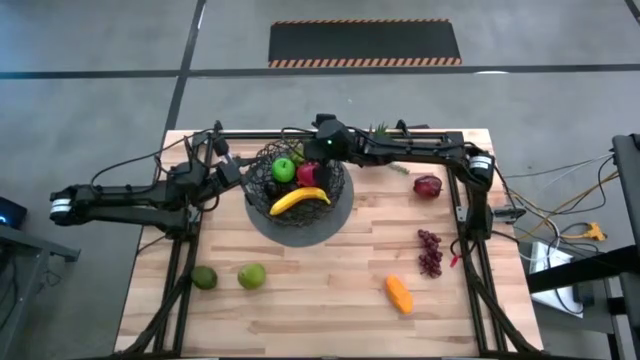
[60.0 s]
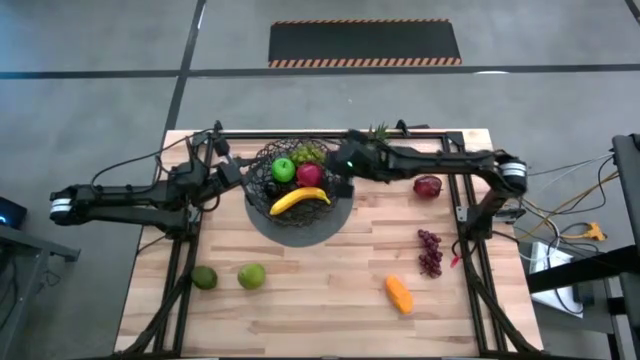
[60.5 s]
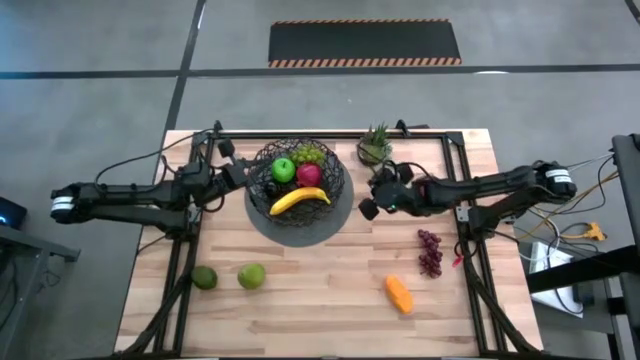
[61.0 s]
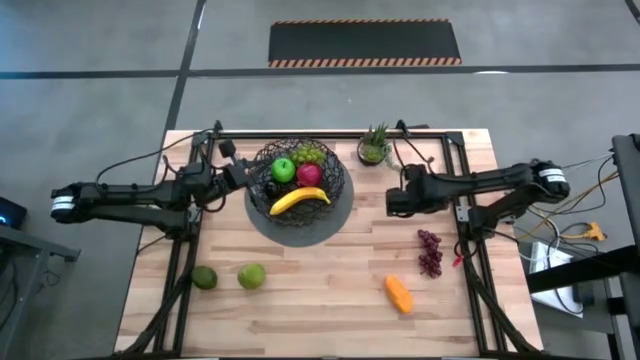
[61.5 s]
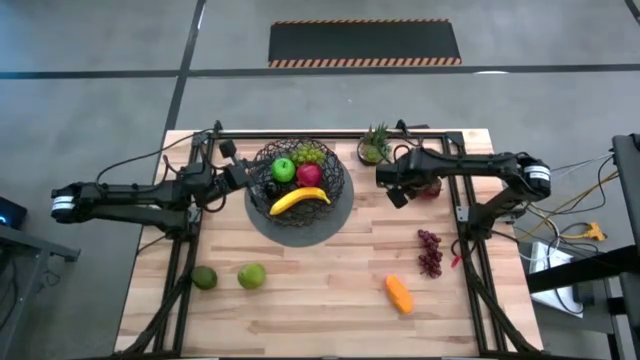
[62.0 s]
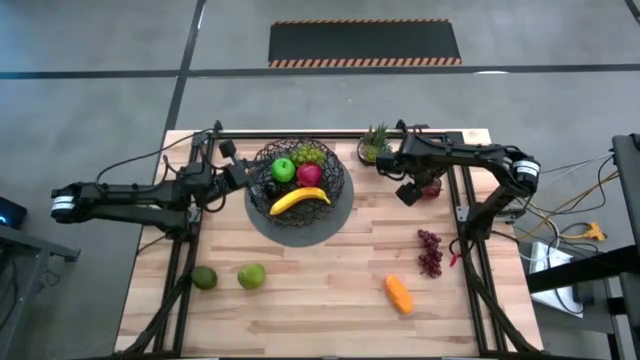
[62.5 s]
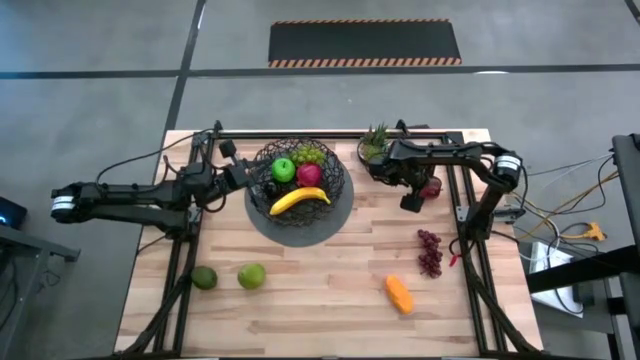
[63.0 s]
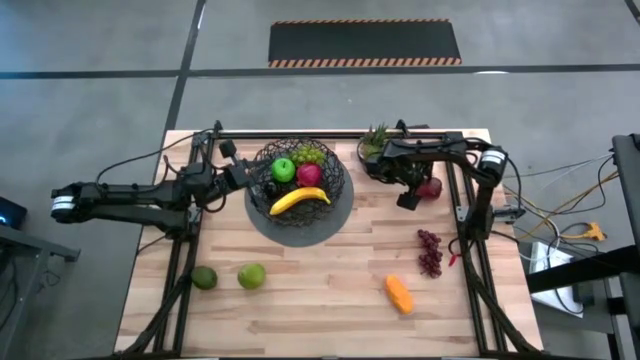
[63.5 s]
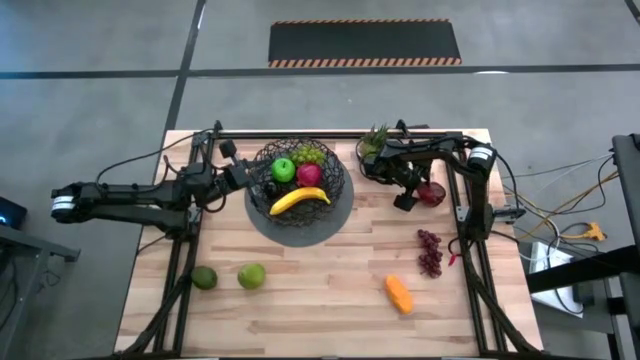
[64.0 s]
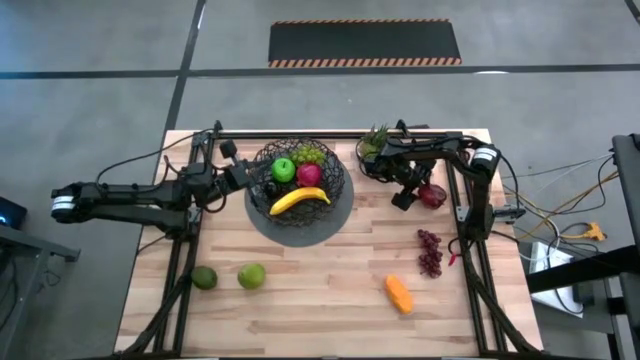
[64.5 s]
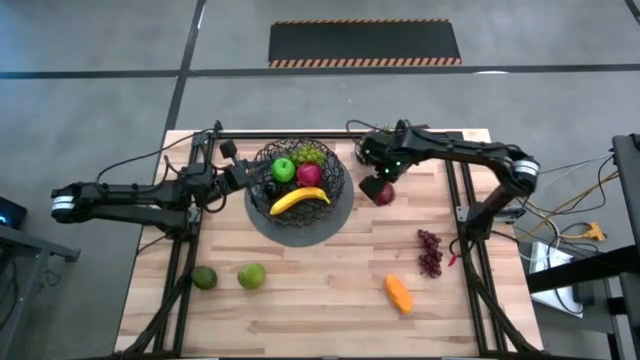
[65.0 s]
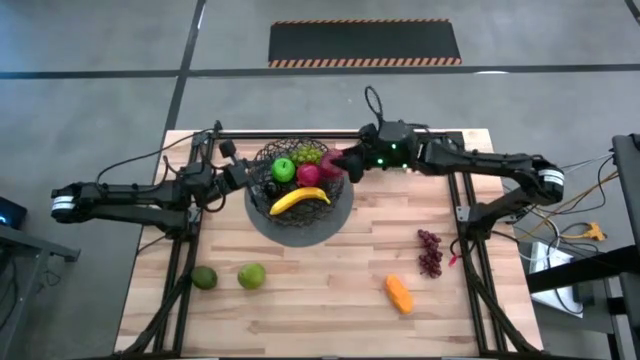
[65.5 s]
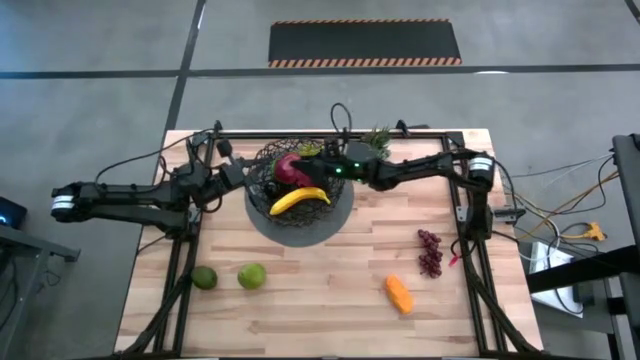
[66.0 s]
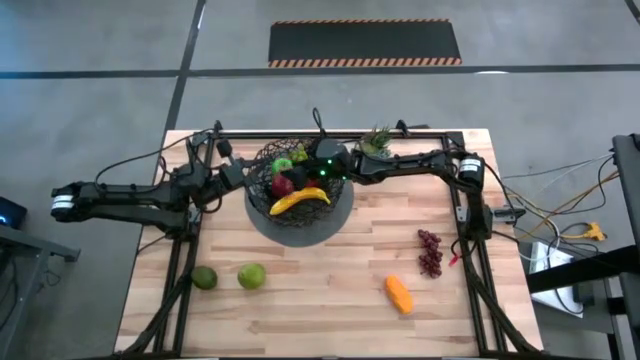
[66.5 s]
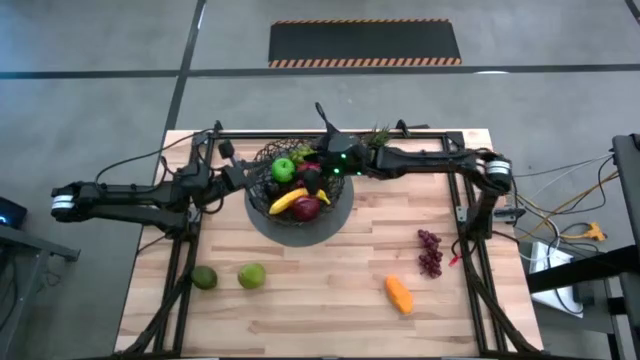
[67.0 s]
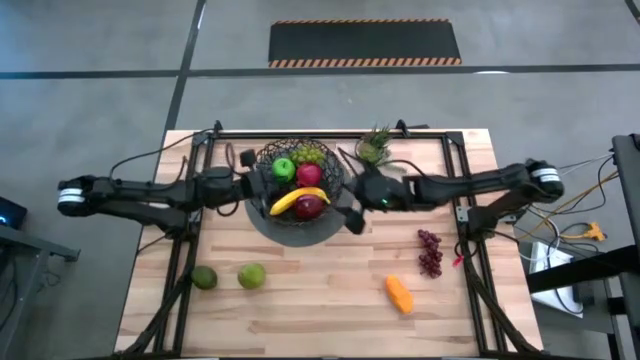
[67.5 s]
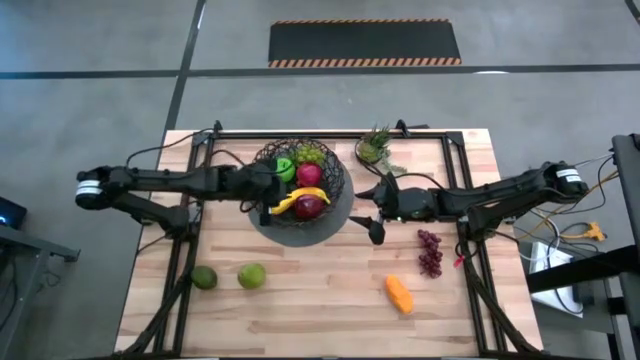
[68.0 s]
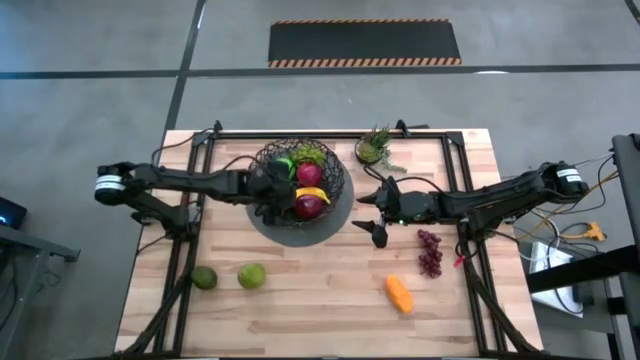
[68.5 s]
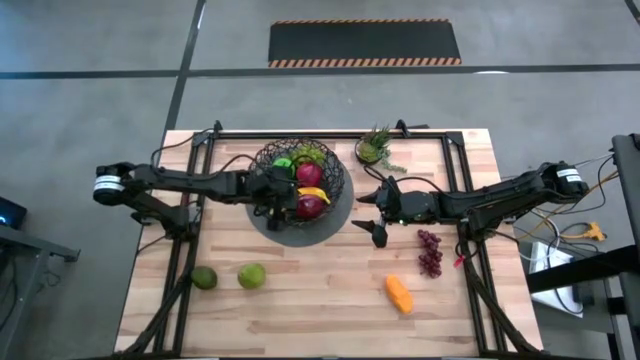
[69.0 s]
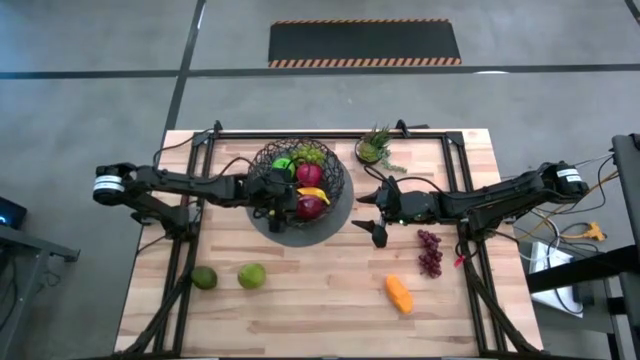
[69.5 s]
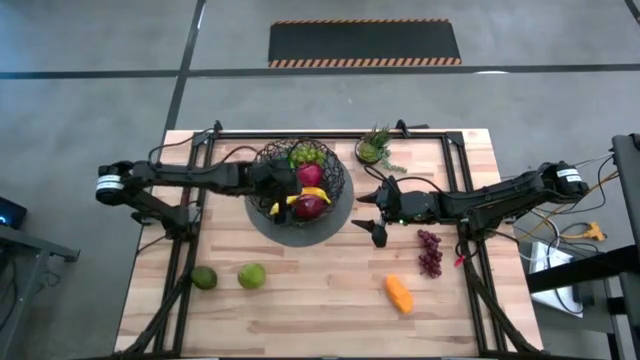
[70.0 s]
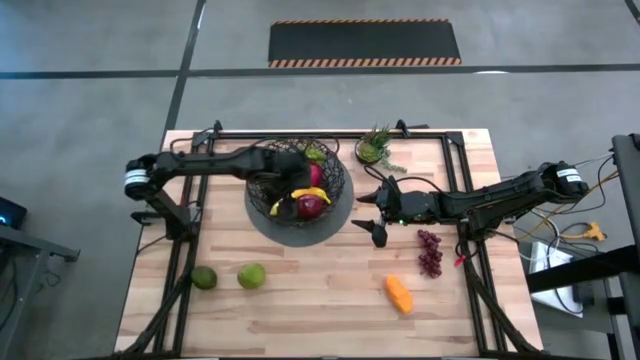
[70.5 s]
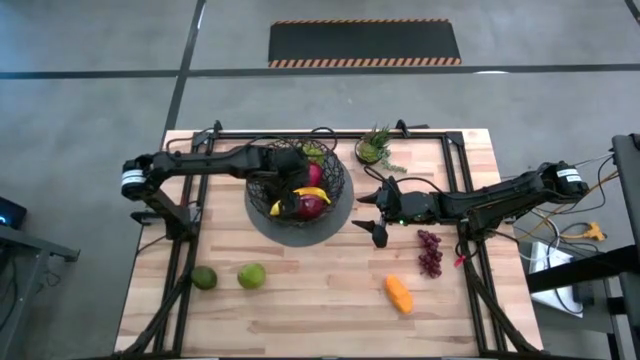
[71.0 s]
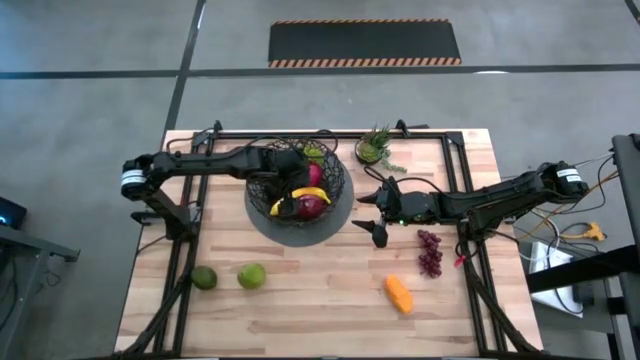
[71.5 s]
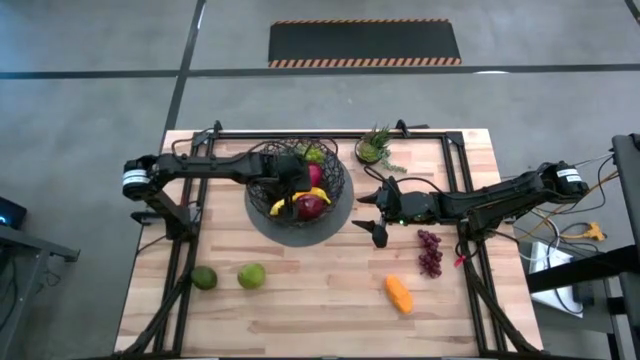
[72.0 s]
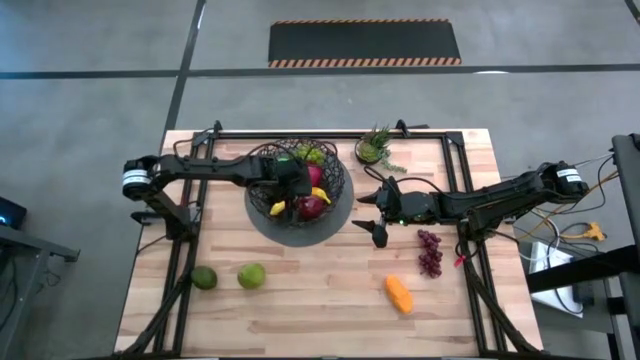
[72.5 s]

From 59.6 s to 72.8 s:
Task: Build produce basket
Put the red apple into the black wire basket

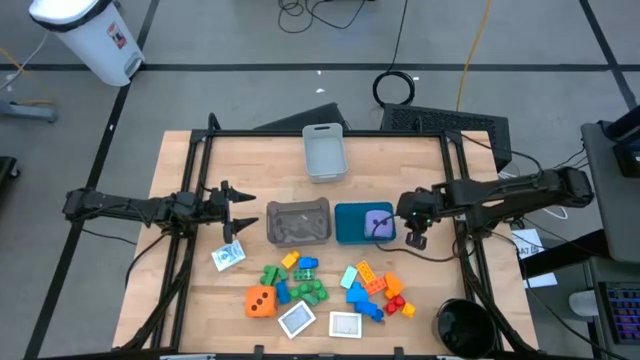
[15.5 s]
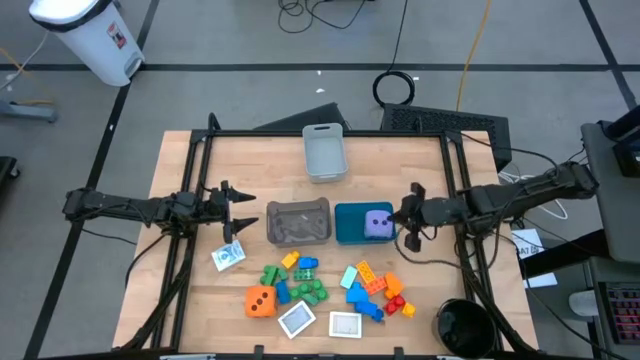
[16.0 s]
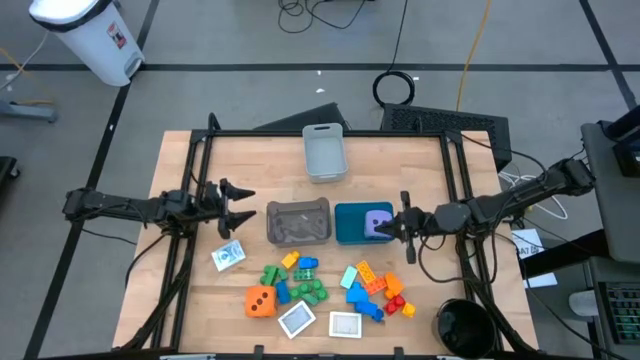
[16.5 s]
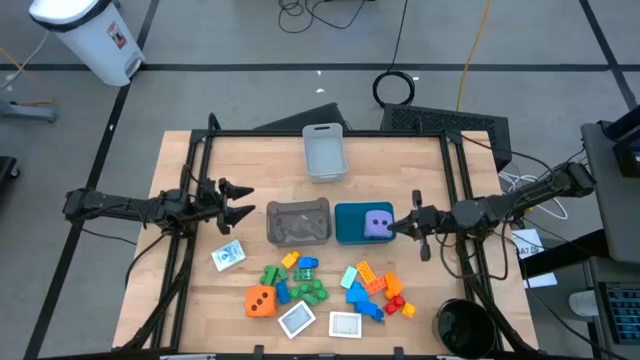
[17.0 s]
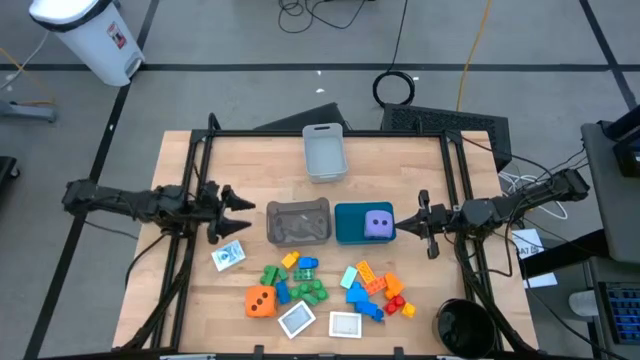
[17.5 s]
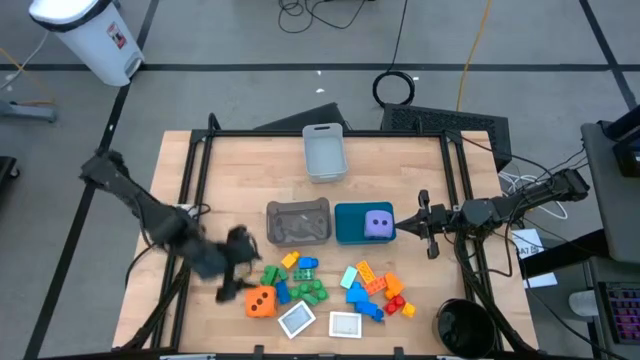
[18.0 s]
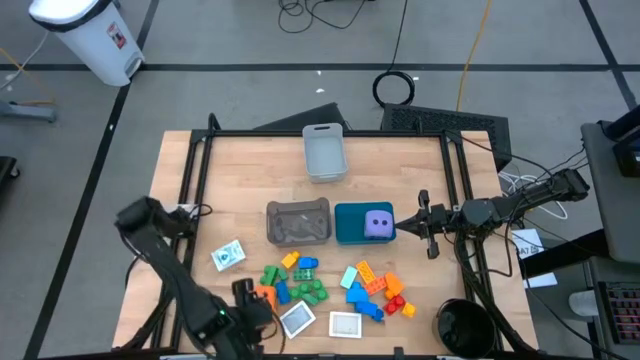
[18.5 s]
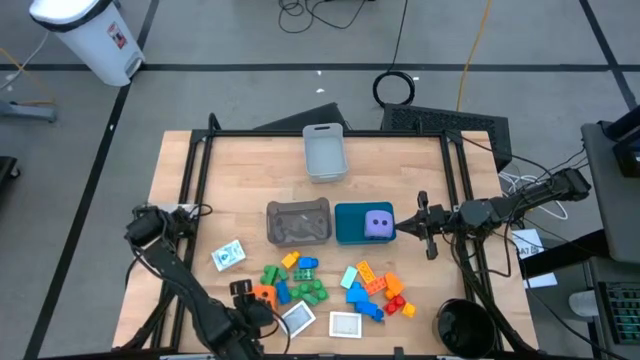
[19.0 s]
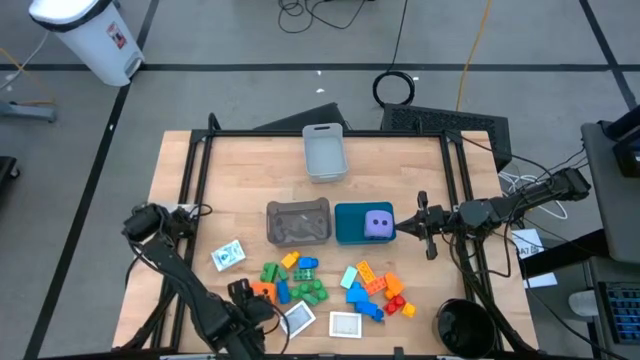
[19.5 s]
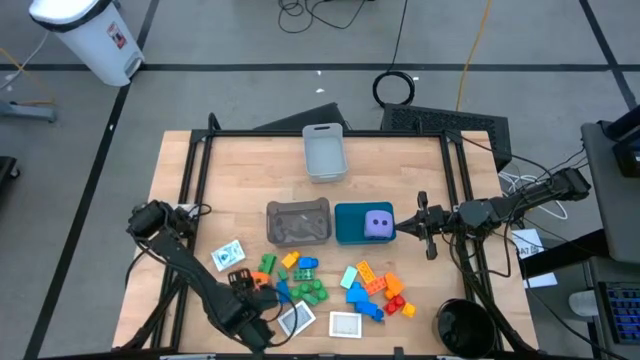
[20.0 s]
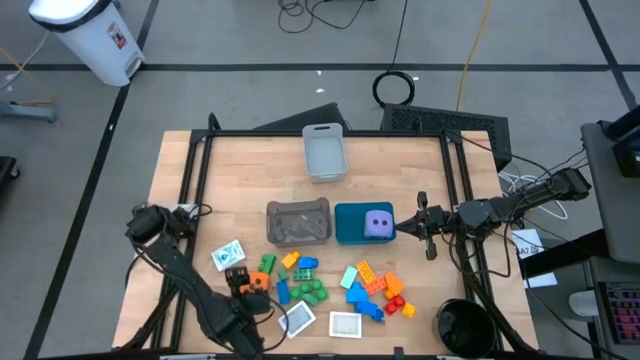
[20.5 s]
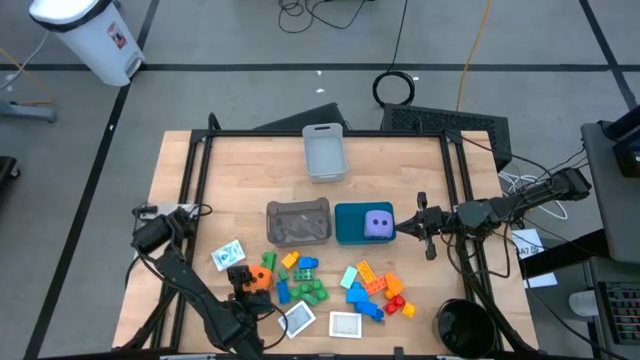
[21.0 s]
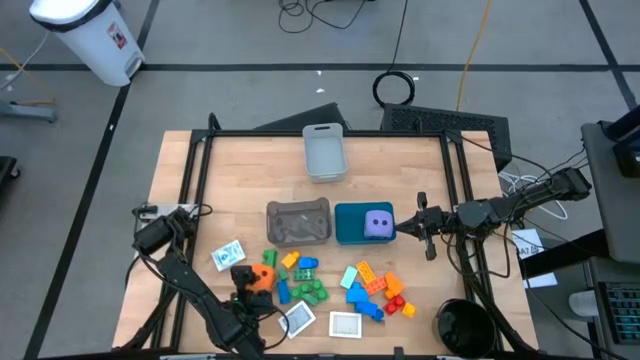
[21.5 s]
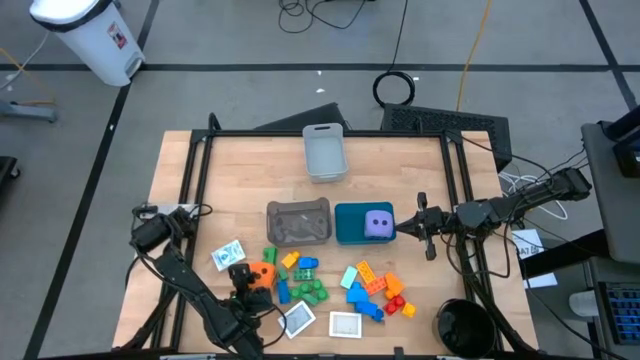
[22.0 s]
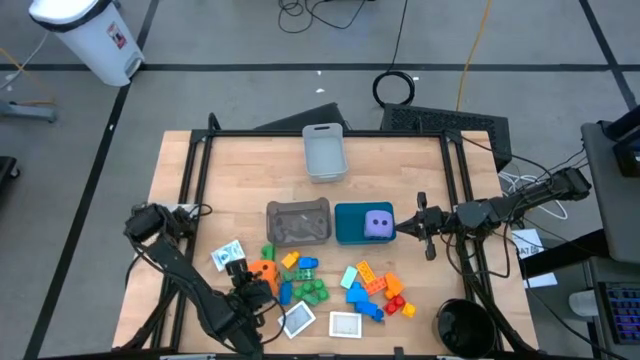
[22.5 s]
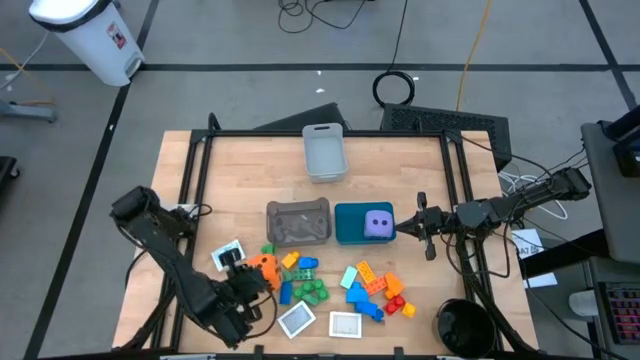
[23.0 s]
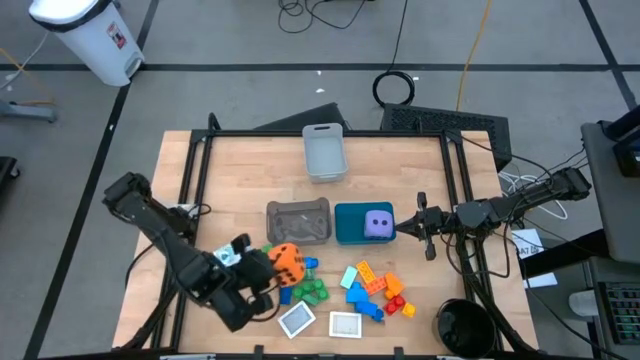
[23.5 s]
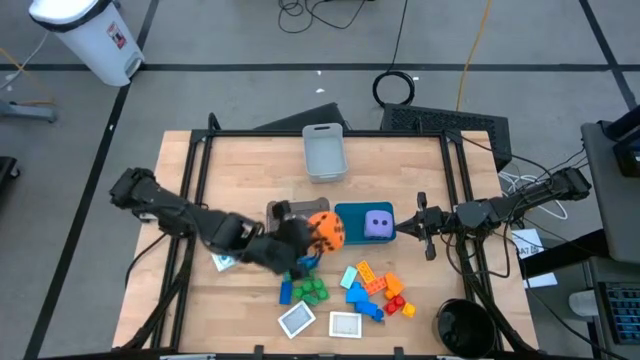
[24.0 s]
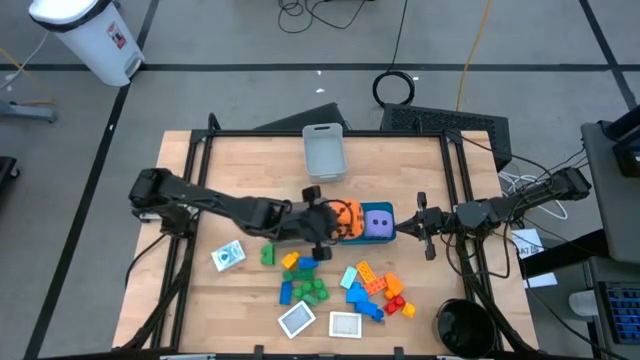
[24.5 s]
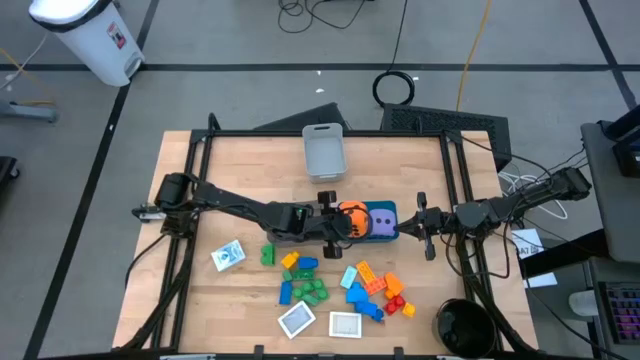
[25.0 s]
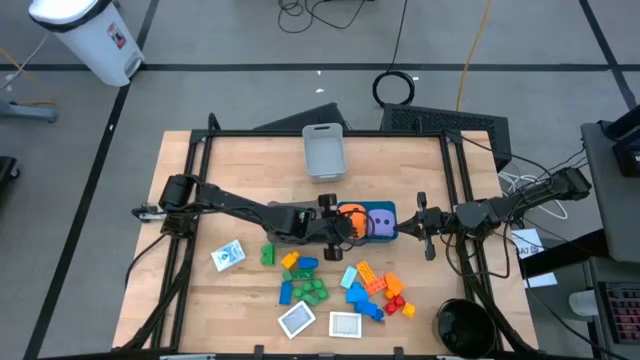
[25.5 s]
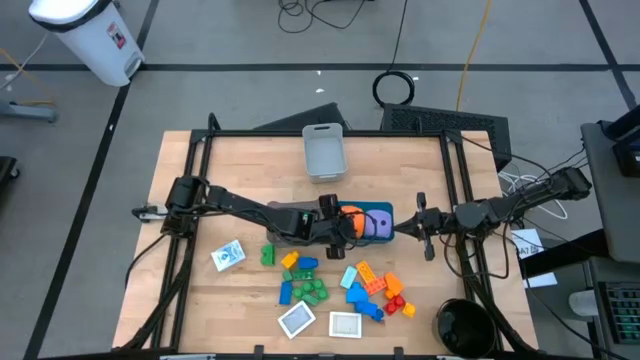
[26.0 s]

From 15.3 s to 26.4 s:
Task: Pick & Place Toys
Put the orange dice into the blue bin
